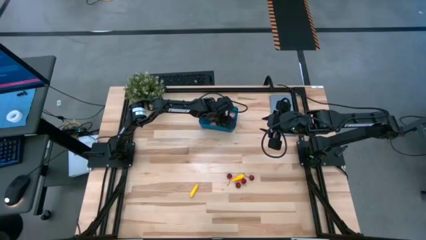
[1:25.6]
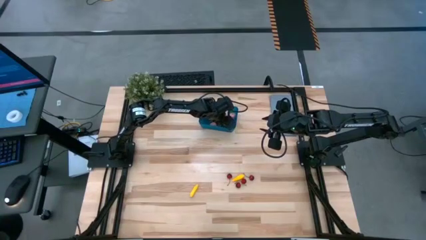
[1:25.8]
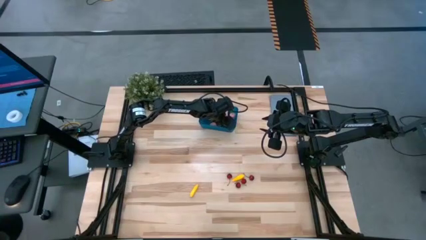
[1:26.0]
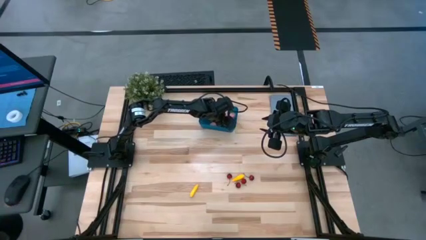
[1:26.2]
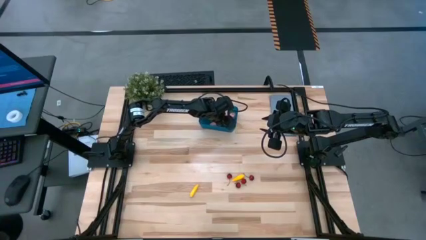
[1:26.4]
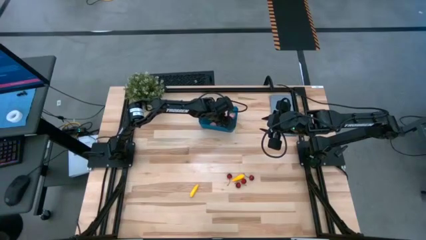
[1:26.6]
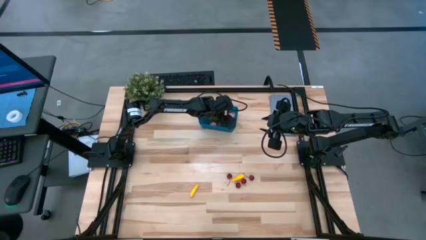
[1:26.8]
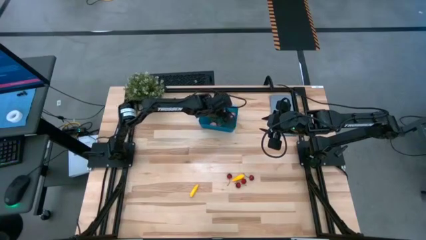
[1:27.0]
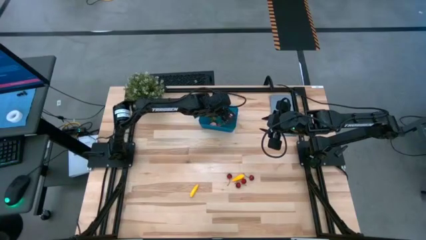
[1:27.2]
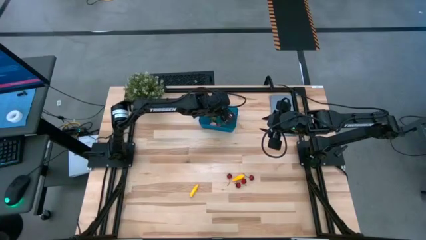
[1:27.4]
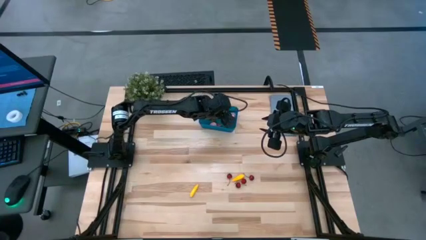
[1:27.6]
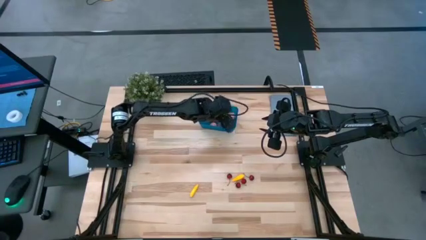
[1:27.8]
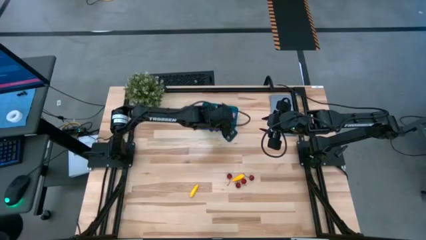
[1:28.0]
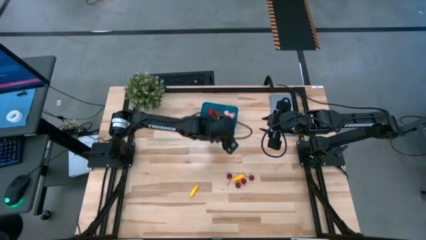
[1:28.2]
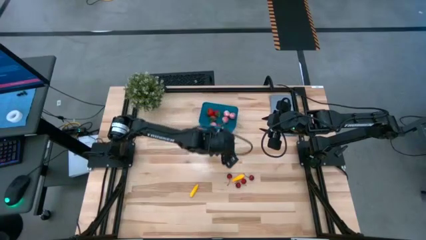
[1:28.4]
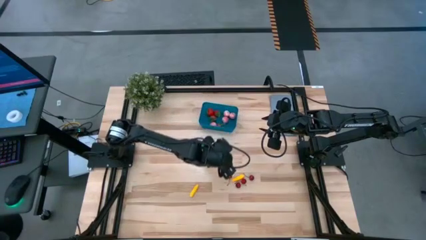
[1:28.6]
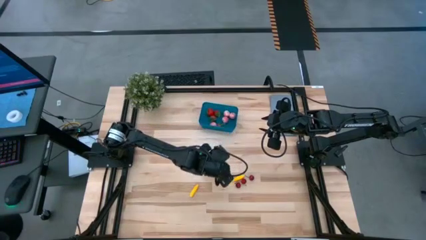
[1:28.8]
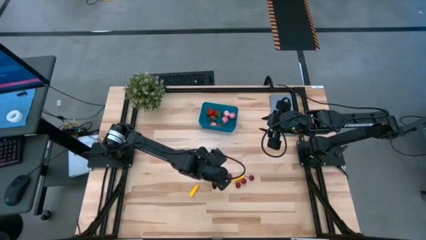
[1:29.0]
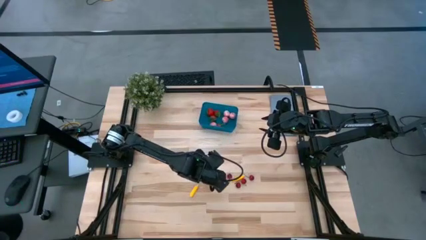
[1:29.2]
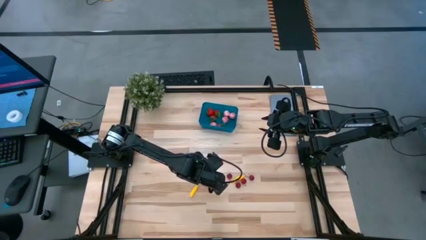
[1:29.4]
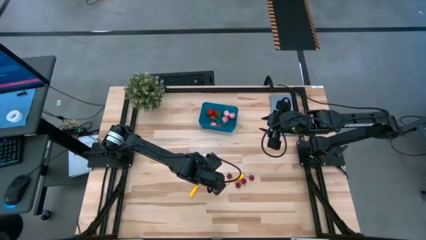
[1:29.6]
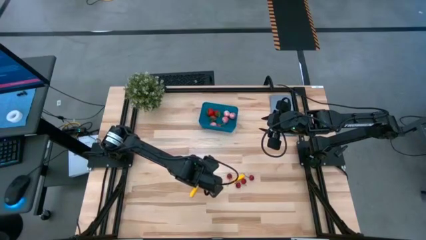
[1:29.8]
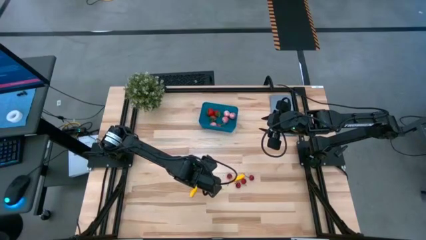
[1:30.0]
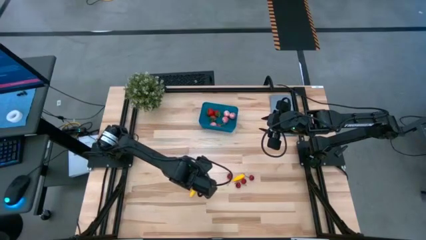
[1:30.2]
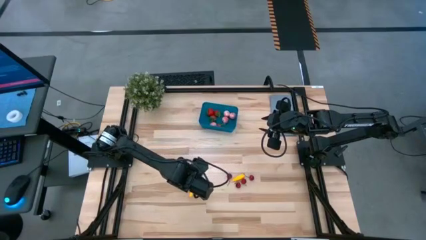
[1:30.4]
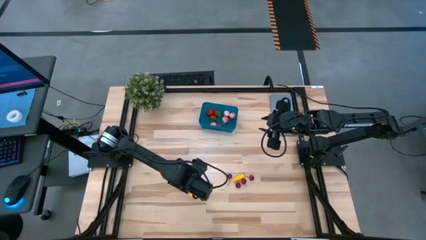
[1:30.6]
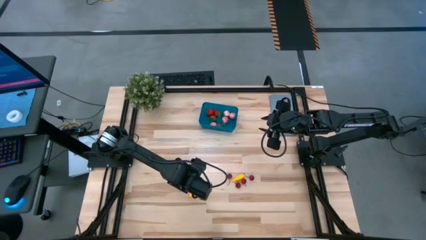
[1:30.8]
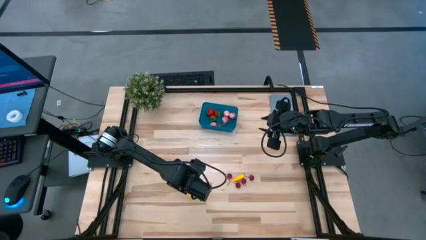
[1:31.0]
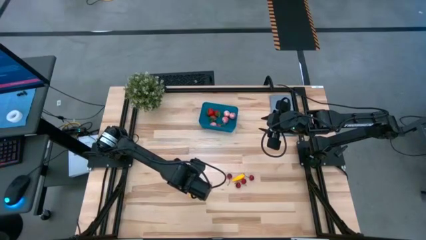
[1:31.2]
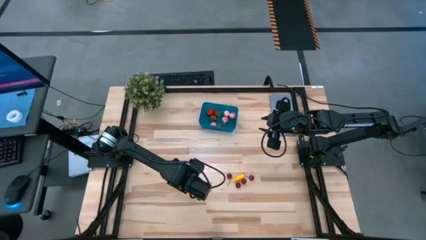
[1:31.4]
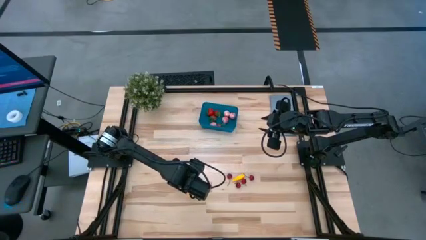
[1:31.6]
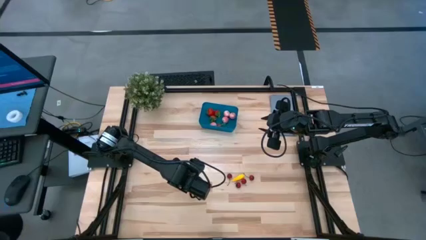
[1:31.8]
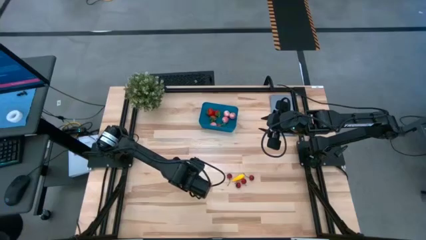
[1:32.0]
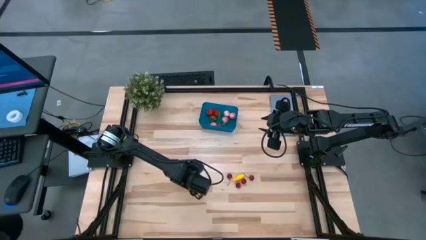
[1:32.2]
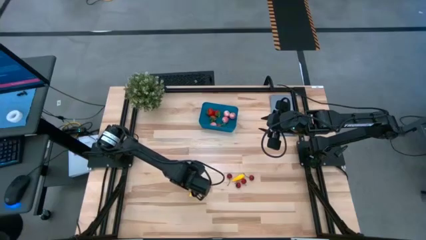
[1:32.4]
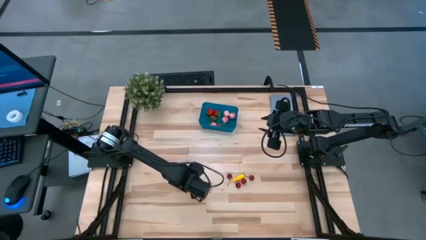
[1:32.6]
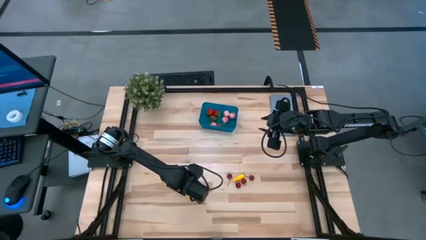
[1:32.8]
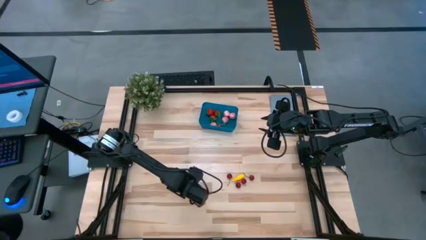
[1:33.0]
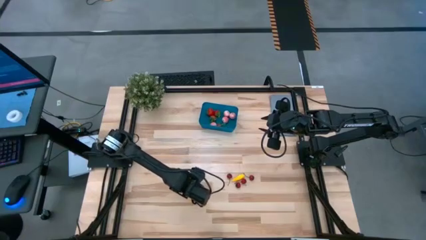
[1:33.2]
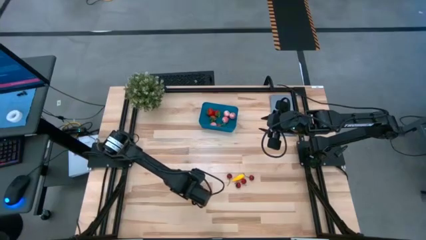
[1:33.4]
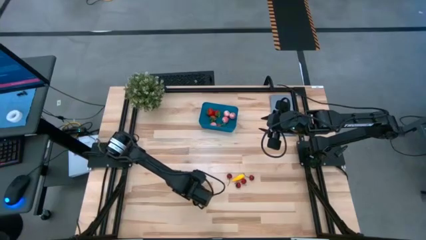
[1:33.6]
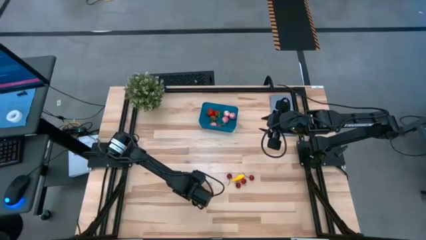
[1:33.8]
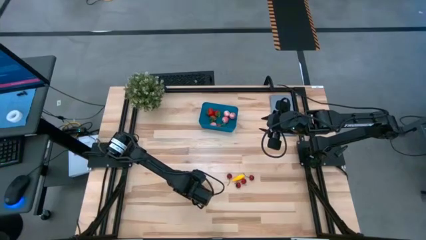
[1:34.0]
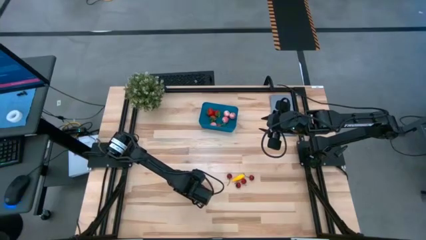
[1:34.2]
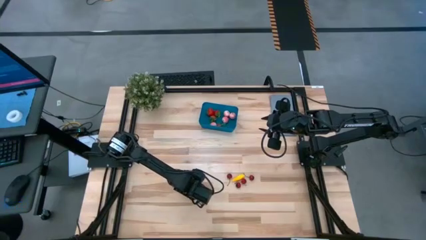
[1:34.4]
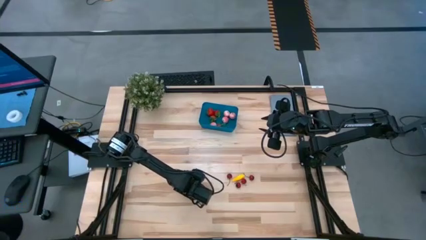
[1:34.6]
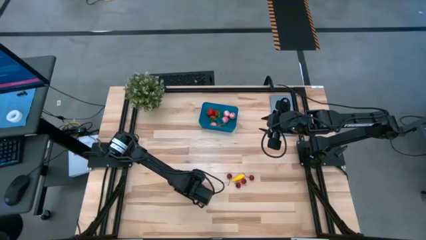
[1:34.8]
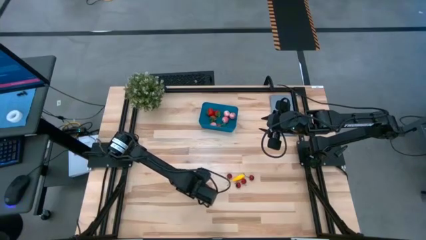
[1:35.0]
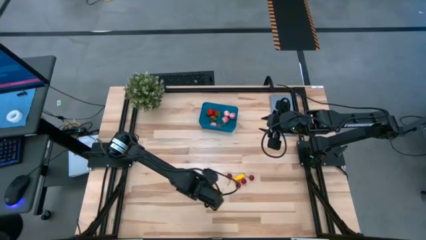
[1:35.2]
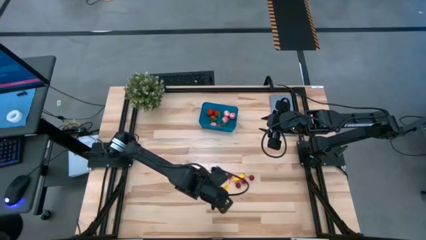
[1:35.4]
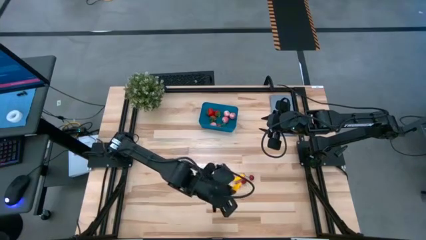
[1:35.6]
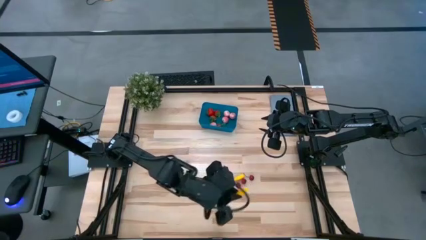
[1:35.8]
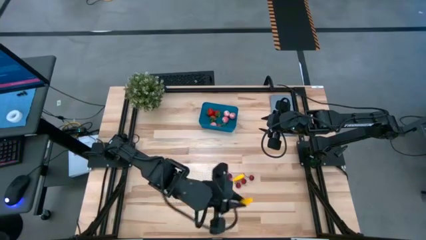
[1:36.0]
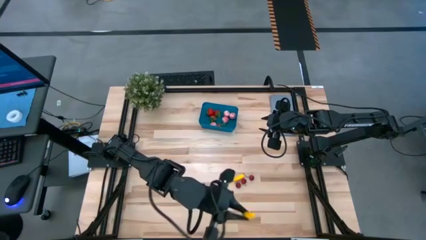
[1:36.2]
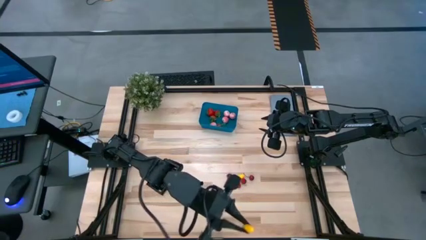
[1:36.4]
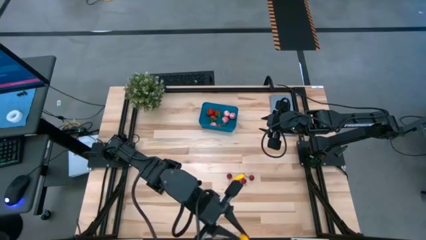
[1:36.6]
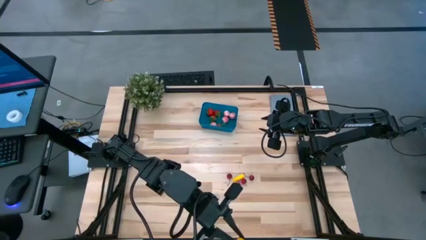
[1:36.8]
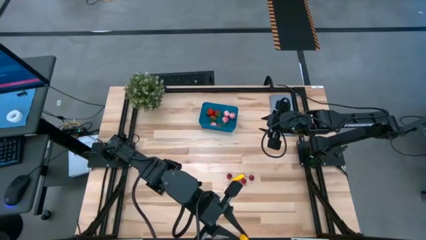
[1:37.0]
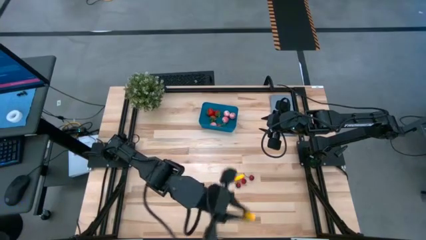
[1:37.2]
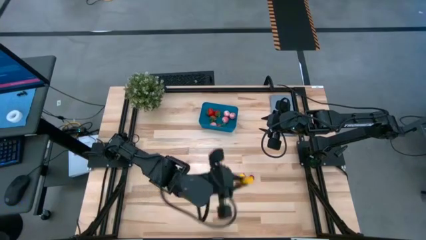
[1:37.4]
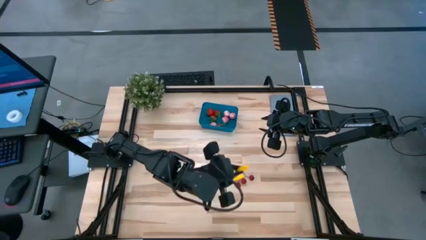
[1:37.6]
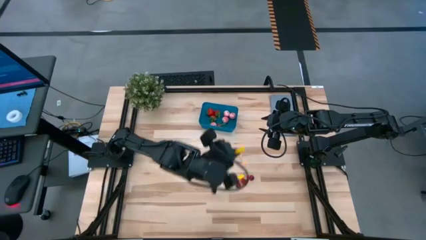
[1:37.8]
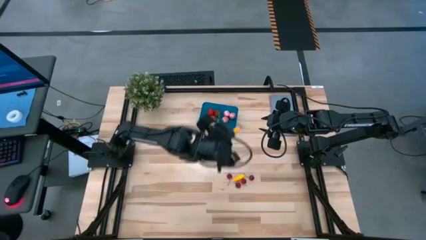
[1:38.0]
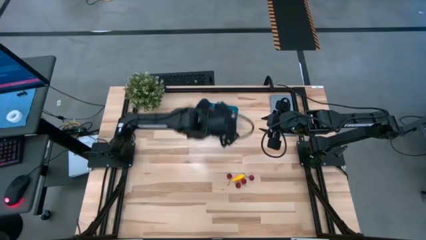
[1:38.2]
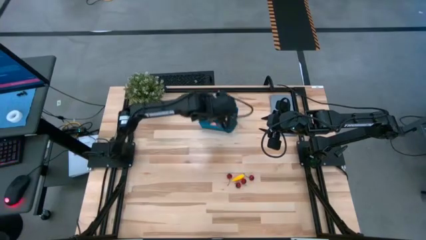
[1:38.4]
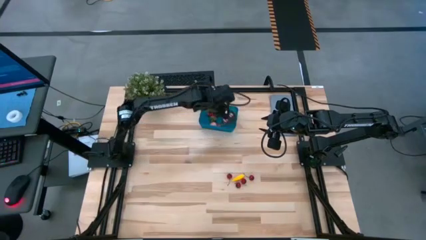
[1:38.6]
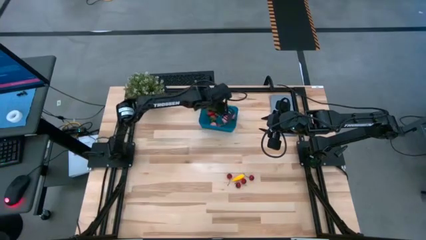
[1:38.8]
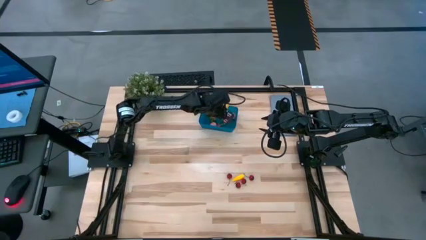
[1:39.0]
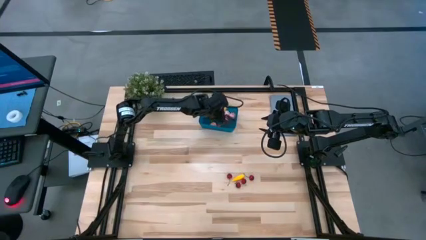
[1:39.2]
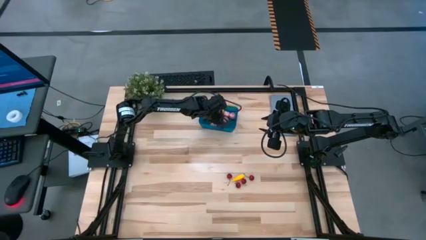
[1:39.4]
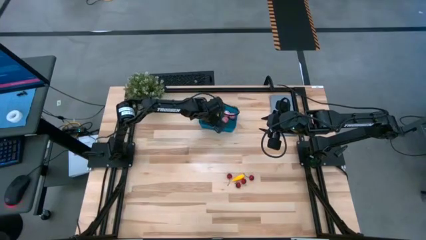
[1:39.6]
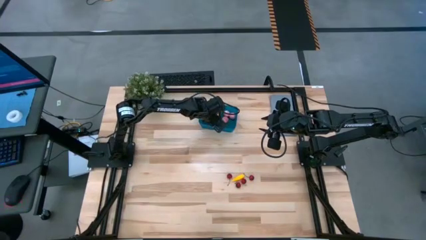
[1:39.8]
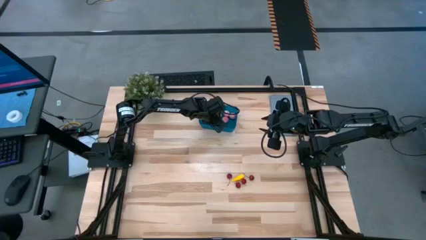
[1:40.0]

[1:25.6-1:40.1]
Task: Pick and placing Produce into tupperware
Put the corn into the blue bin

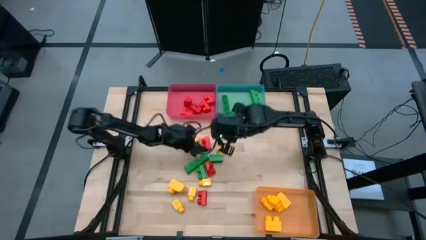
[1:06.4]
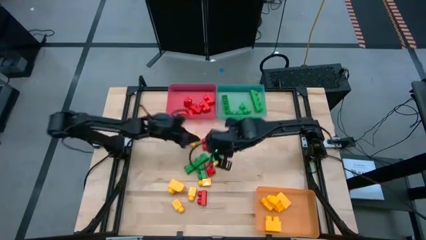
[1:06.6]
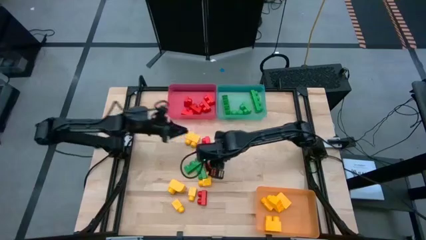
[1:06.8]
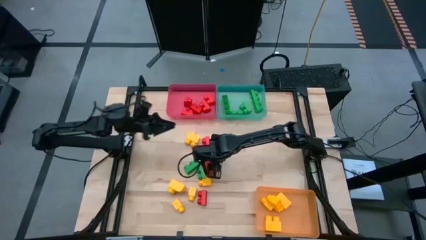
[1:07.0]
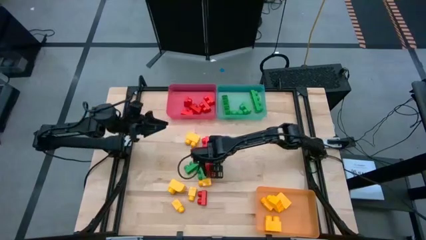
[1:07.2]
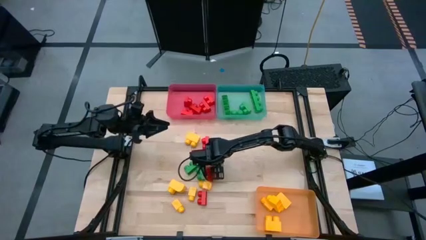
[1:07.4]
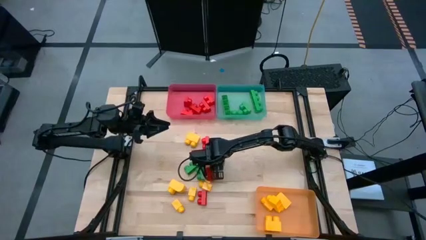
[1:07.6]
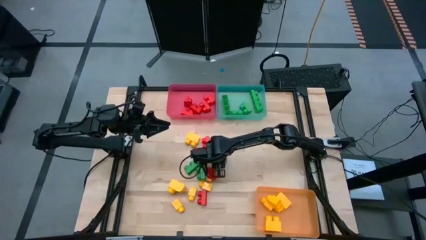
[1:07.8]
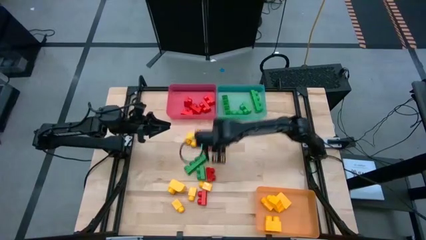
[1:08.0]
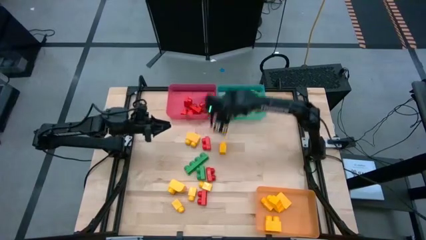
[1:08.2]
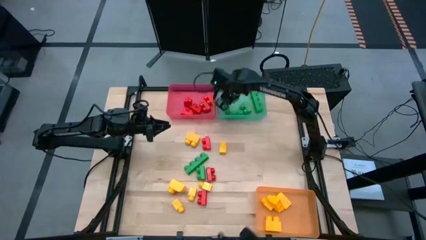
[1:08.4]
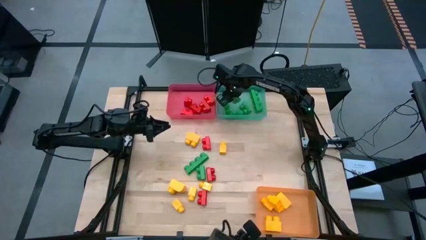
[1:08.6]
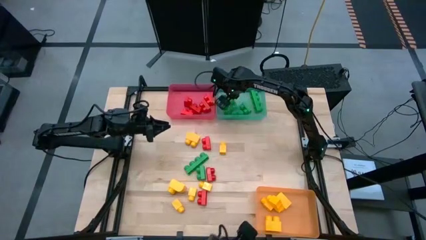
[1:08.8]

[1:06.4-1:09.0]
Task: Sort blocks
Put the green game piece into the green bin

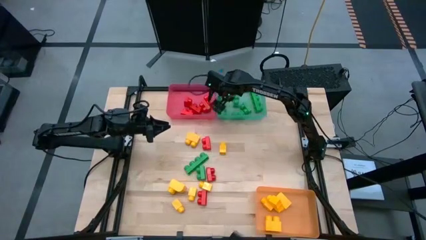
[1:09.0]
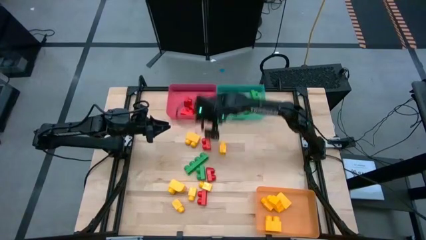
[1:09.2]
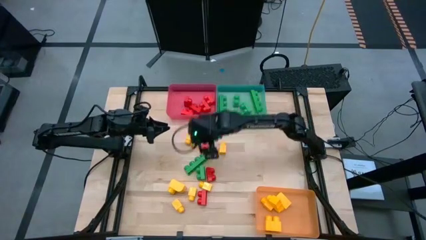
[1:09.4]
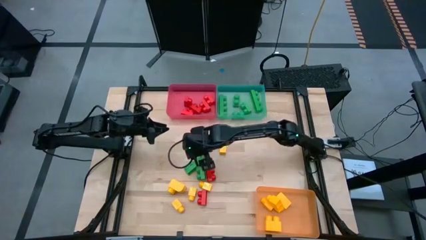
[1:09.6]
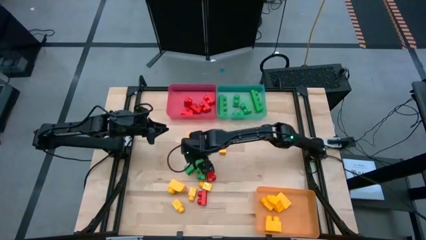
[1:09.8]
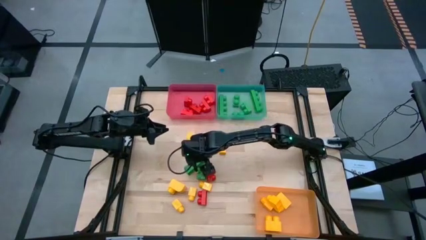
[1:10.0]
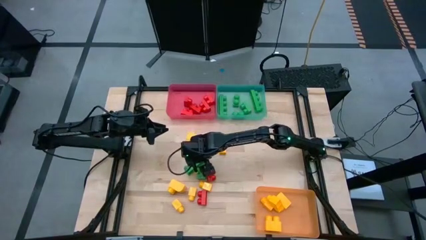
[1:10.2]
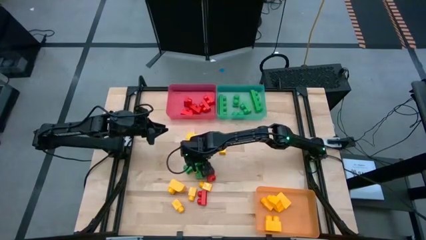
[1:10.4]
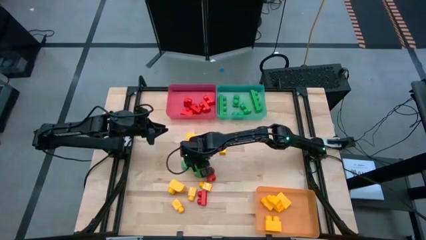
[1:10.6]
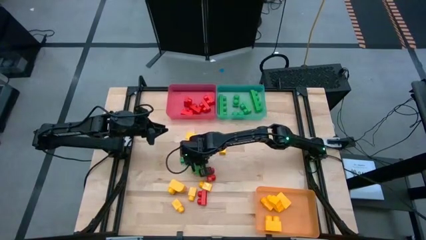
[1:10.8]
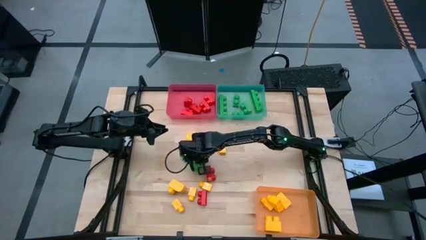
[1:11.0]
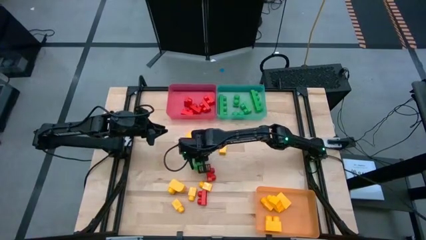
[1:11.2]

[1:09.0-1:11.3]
Put the green game piece into the green bin
